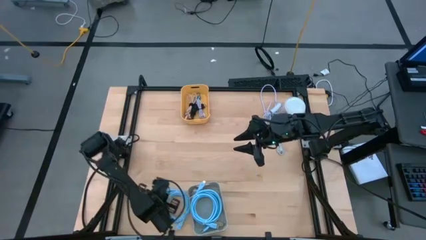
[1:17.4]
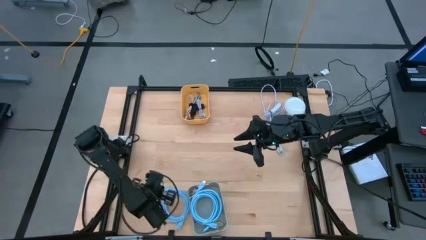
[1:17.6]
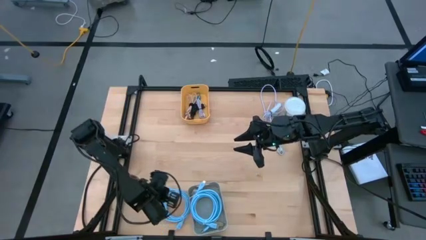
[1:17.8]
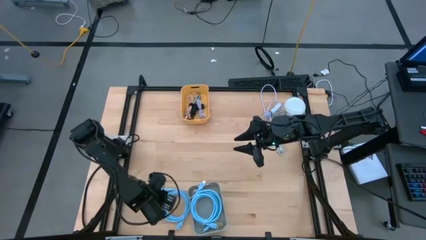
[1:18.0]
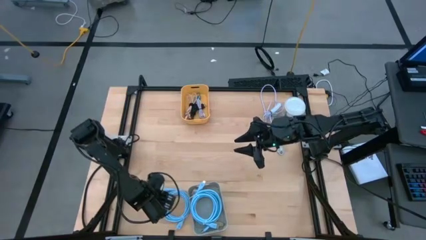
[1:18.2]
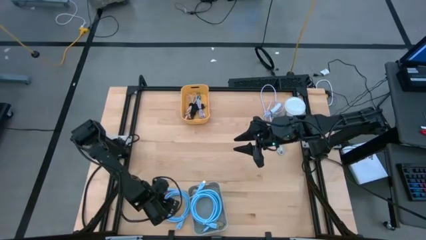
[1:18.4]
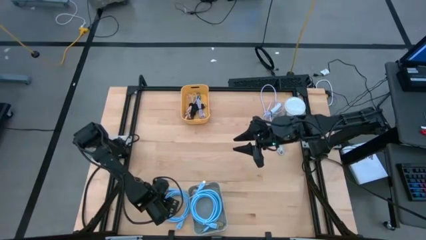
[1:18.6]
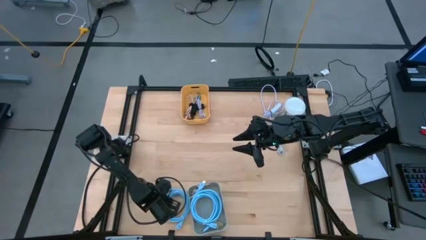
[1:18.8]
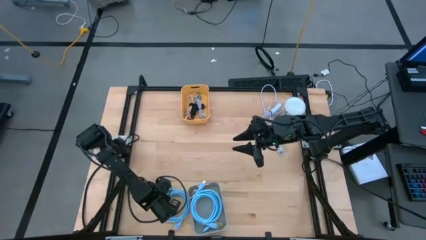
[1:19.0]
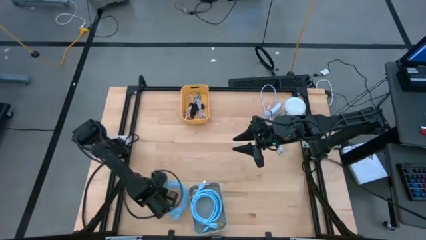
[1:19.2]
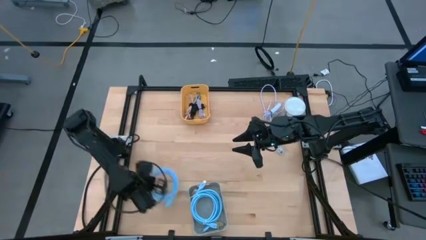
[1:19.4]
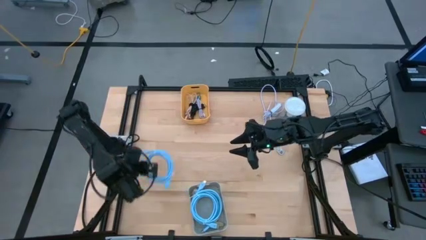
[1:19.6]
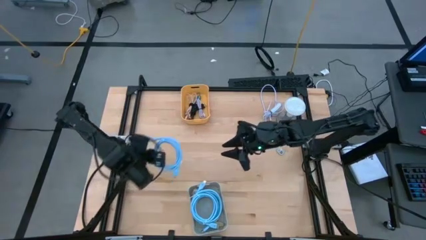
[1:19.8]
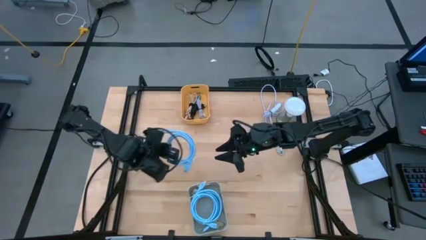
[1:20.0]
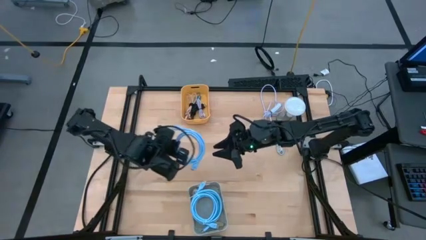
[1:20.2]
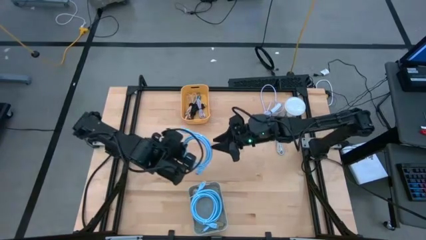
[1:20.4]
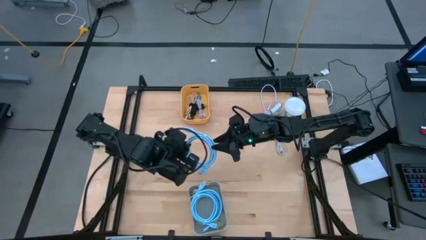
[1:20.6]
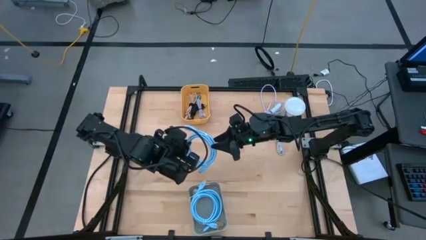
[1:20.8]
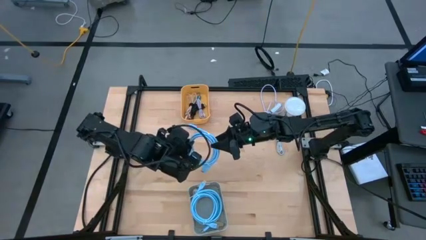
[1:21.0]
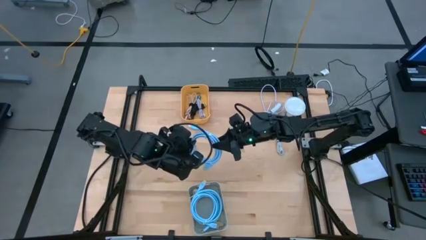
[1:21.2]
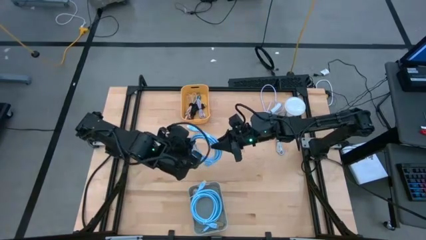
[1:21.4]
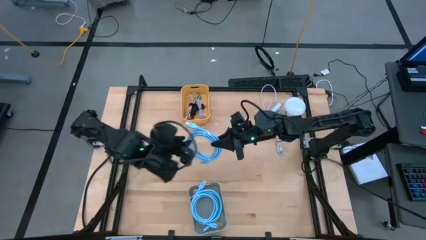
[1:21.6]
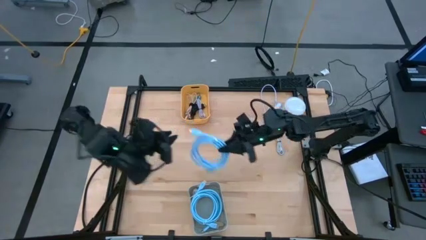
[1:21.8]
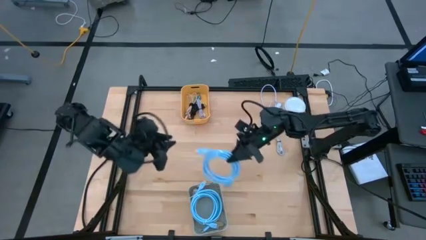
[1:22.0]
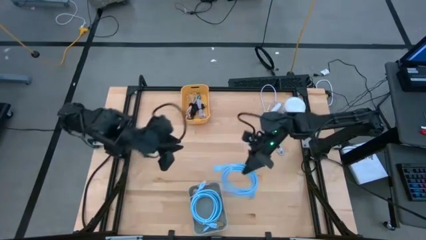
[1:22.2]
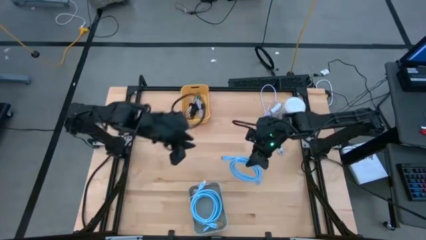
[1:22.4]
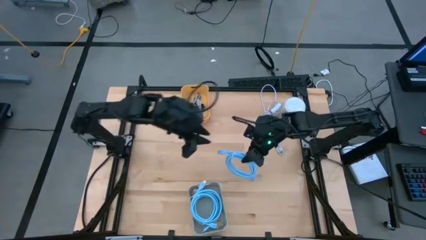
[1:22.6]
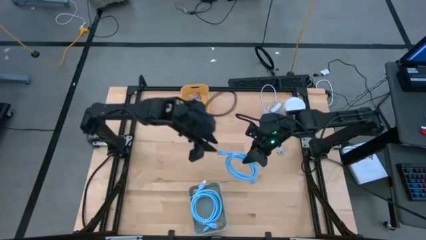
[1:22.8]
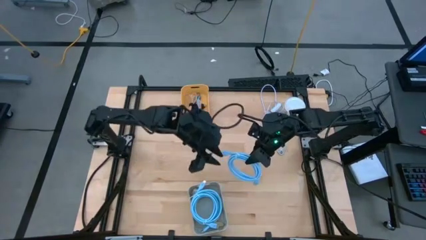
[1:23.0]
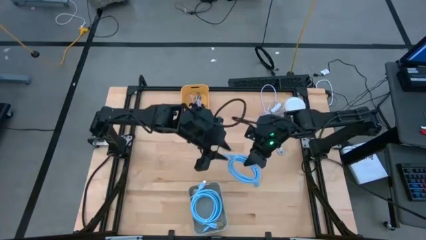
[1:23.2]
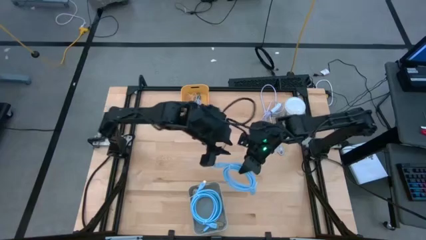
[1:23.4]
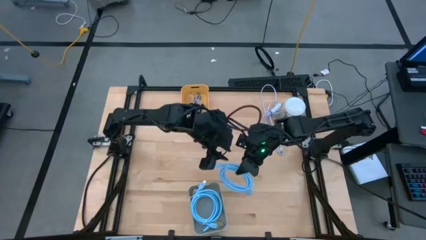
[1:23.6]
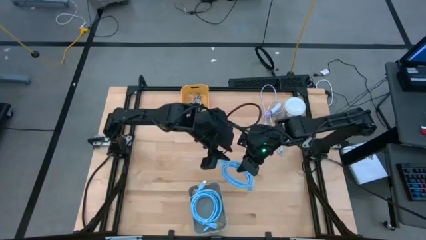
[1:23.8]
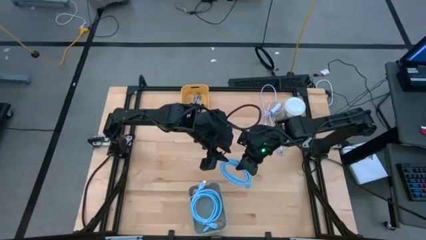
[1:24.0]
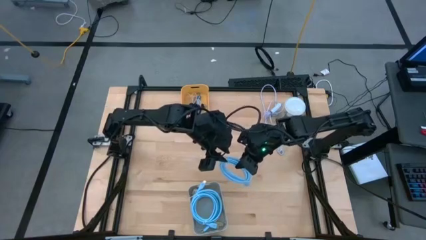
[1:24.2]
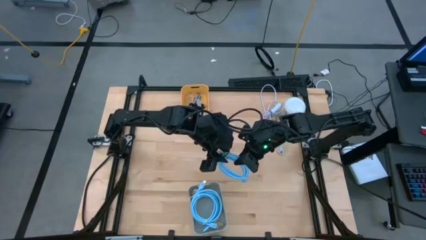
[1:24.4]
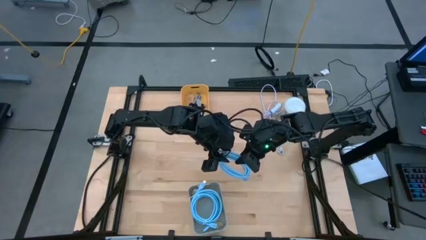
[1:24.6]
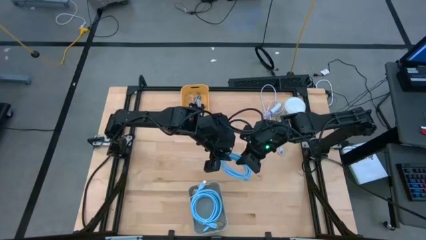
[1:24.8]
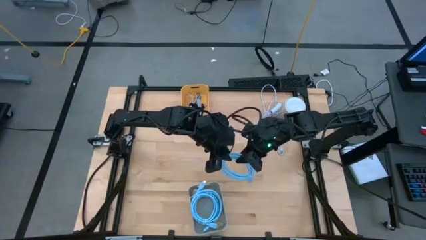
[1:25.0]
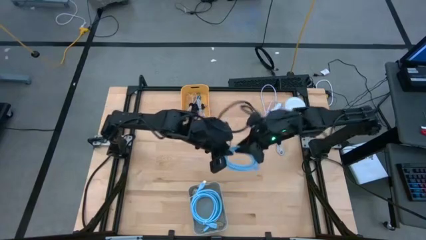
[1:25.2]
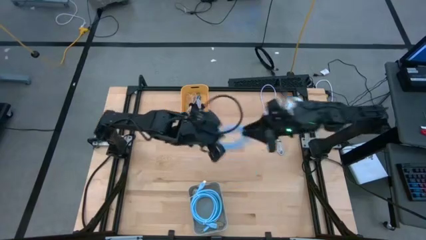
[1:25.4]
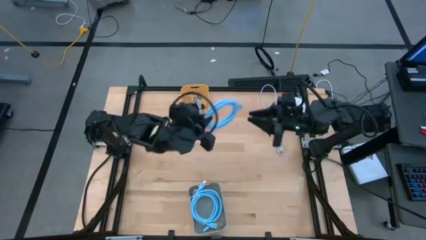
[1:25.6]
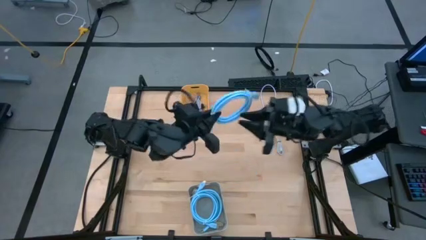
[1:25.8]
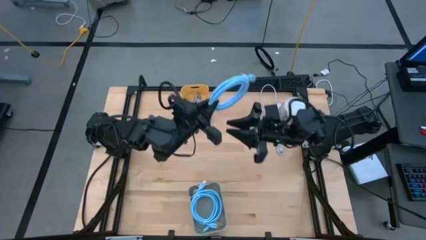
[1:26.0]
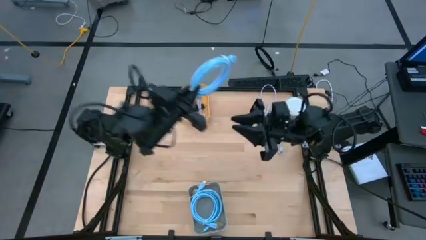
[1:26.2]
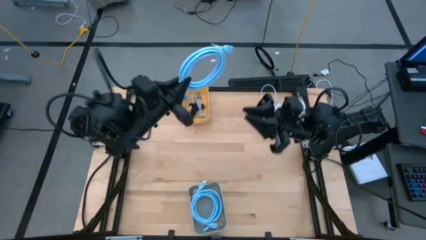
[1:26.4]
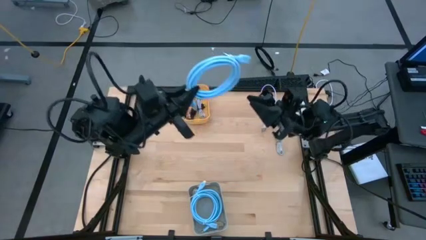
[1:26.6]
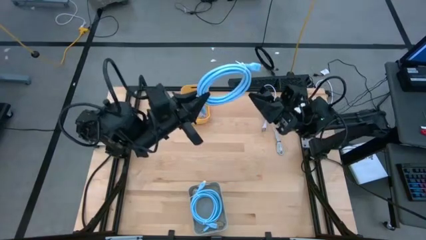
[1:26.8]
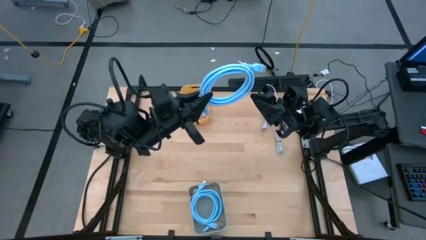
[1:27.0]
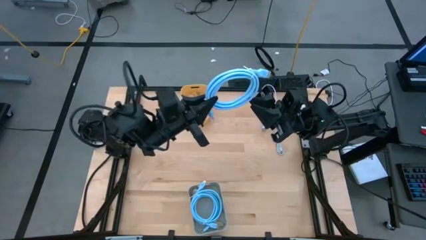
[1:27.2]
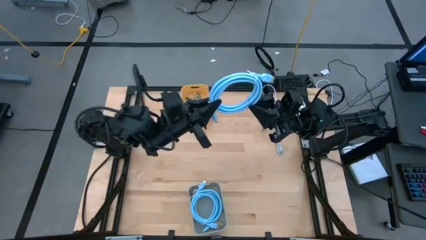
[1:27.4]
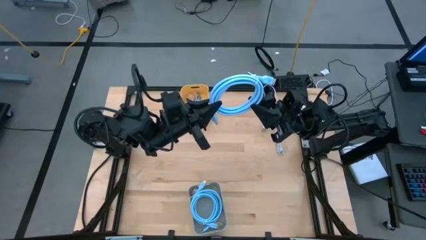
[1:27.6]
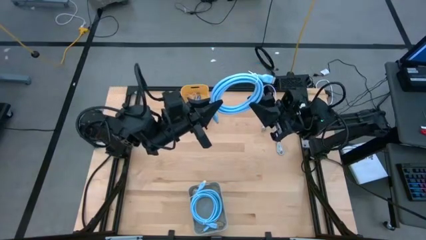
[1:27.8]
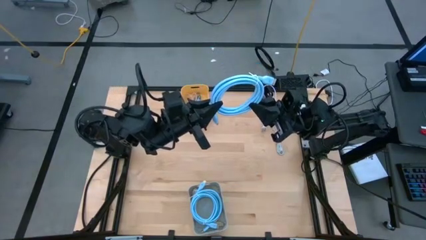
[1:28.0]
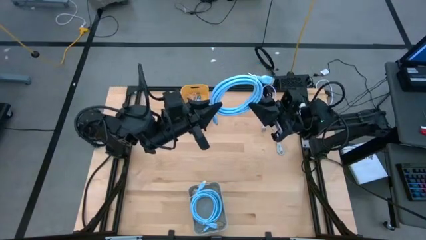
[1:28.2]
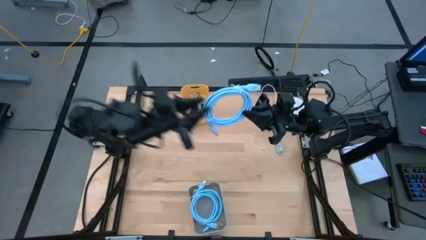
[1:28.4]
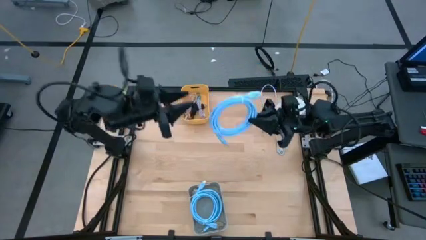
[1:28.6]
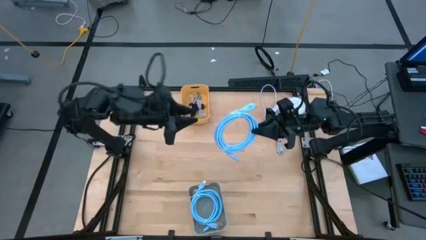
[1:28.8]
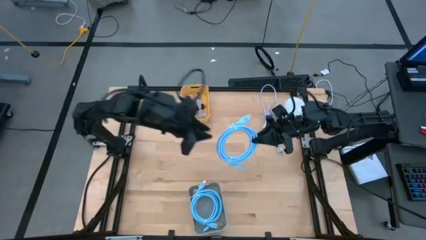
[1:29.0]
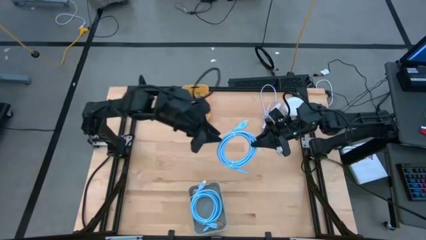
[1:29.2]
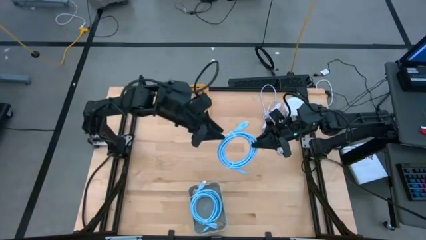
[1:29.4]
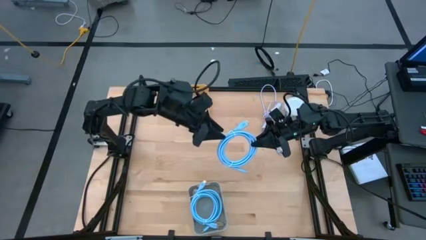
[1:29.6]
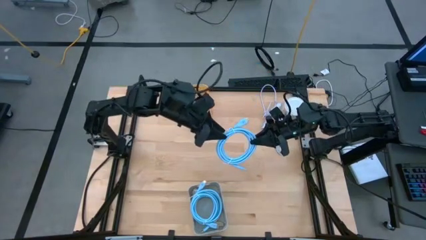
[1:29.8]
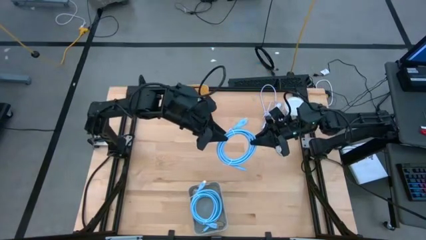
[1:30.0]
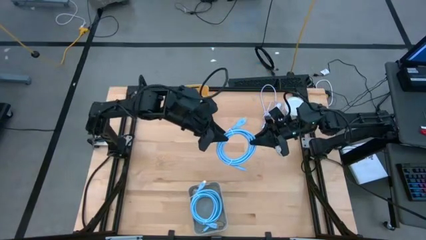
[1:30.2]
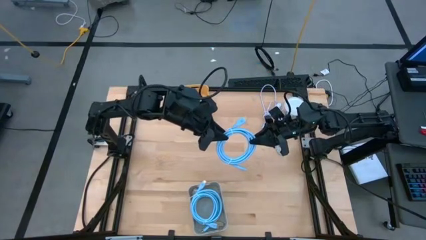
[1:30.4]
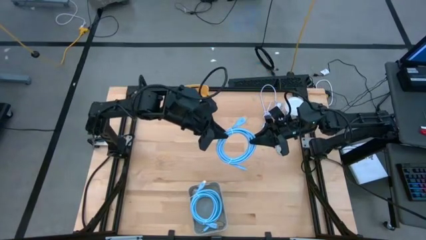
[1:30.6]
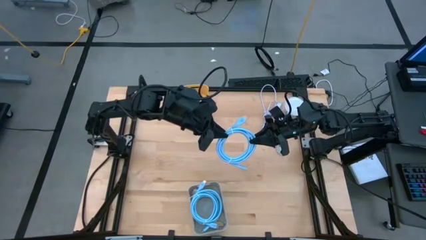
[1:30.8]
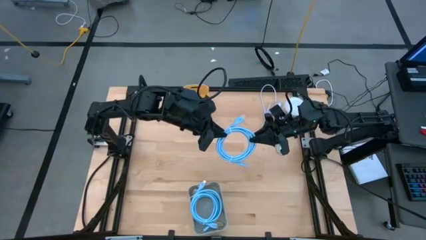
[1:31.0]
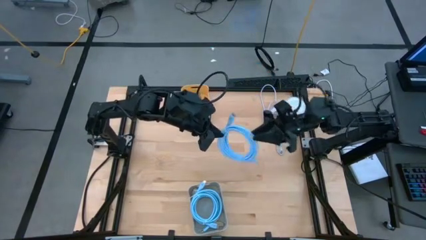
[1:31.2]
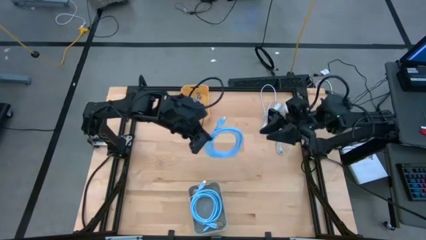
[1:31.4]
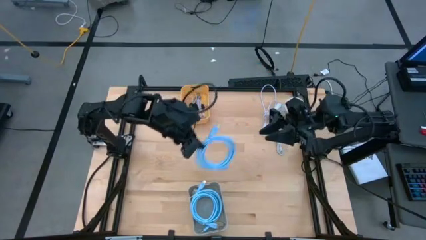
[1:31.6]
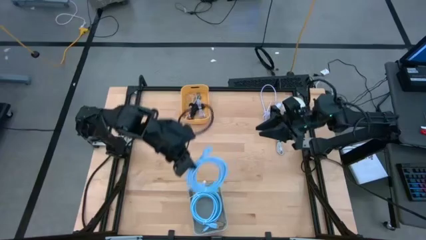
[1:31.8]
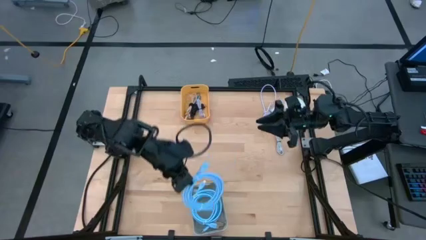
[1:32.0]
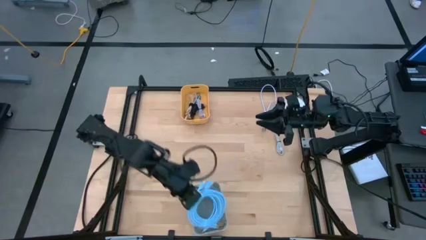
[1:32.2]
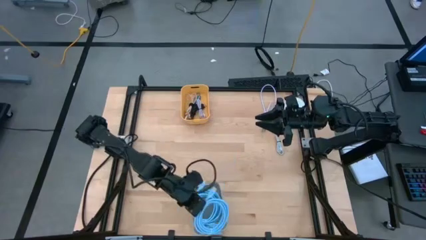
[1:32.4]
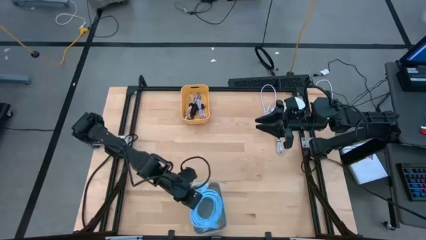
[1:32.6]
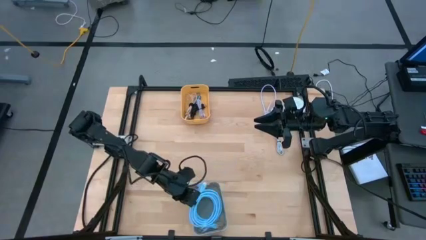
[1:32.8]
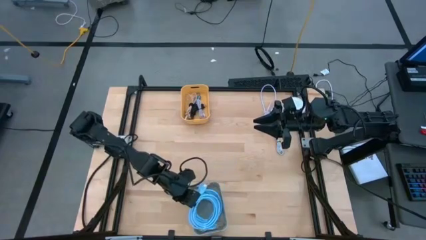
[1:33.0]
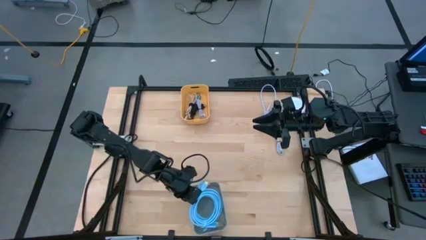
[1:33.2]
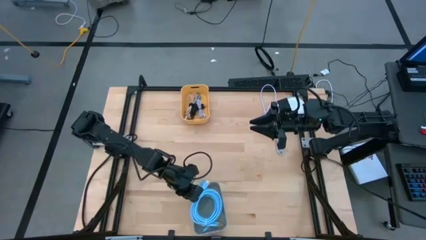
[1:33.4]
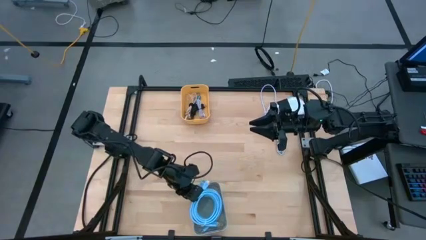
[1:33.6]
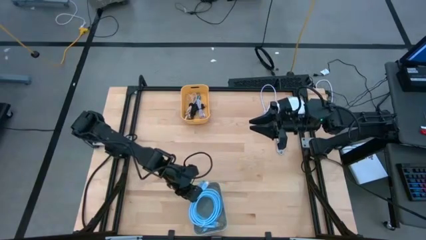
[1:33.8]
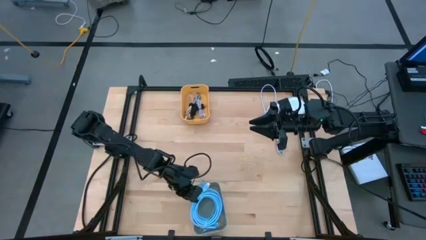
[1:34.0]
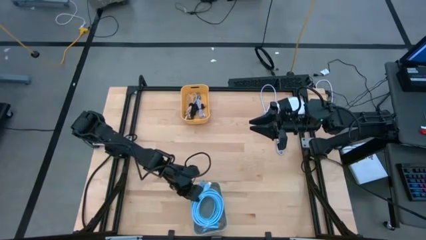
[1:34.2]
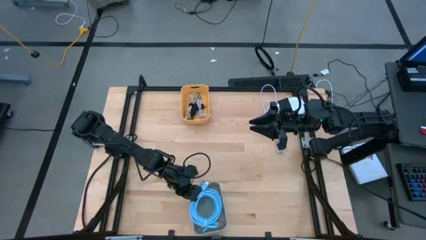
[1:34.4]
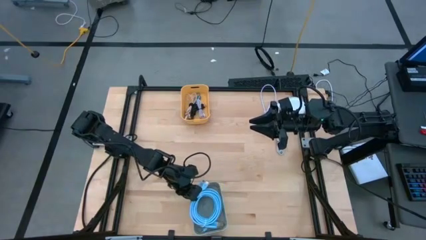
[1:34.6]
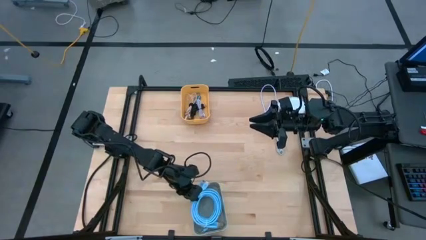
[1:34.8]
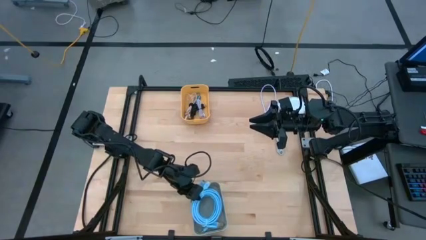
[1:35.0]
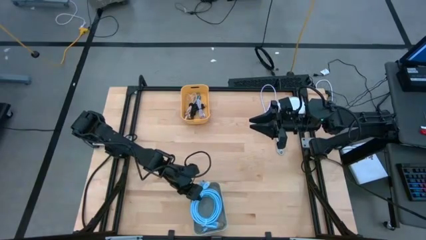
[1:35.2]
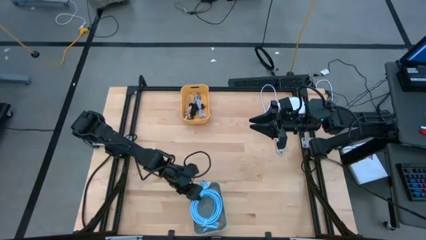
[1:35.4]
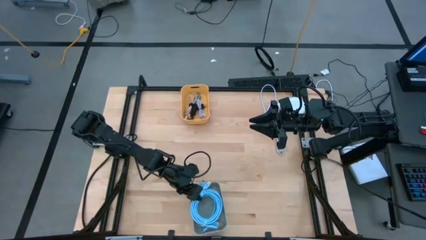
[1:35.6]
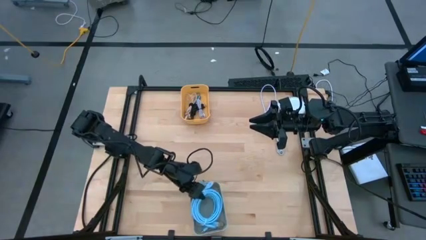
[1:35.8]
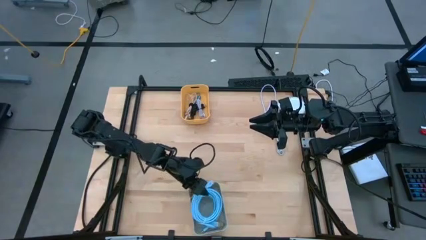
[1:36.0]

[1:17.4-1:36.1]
Task: Pick & Place USB Port
Put the blue video cable into the gray bin
